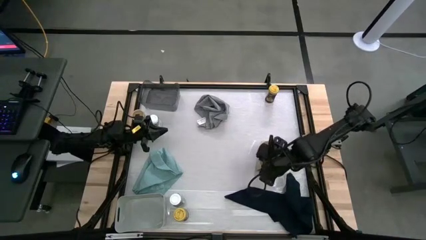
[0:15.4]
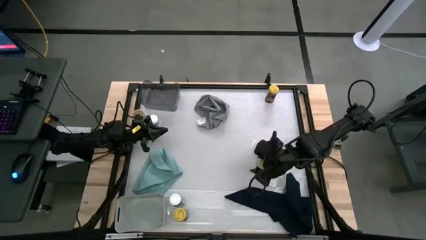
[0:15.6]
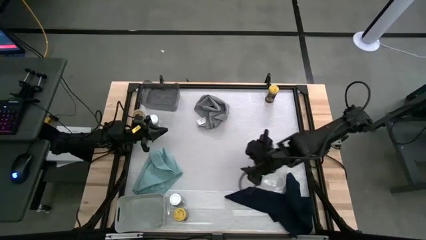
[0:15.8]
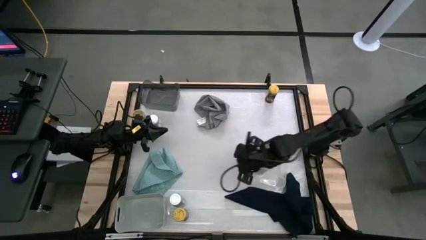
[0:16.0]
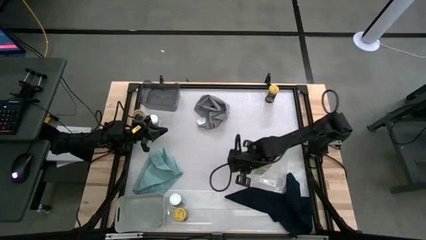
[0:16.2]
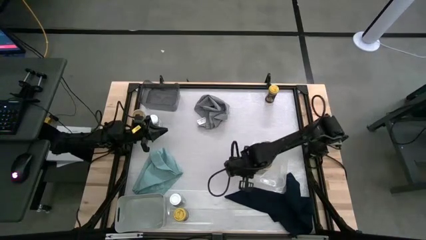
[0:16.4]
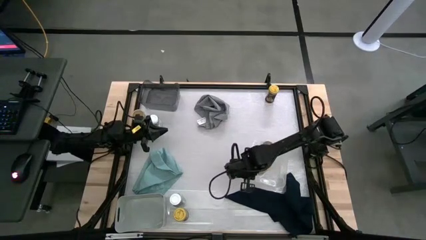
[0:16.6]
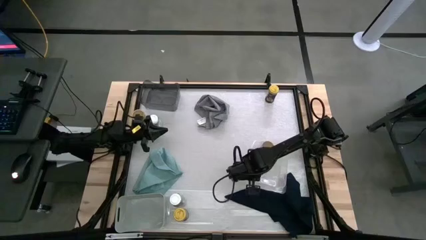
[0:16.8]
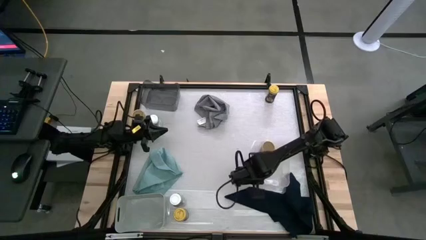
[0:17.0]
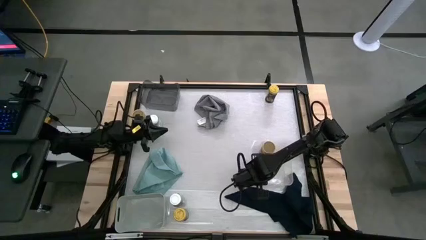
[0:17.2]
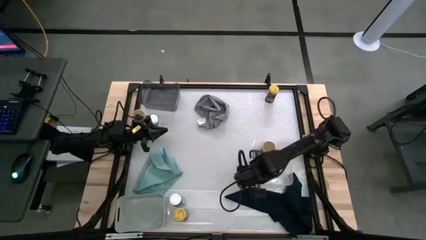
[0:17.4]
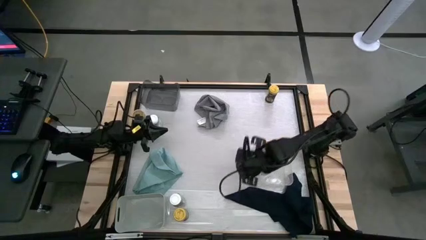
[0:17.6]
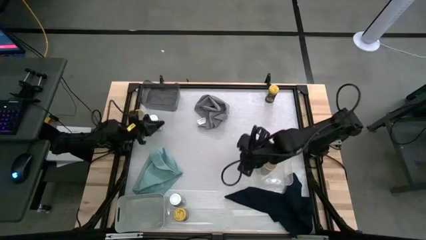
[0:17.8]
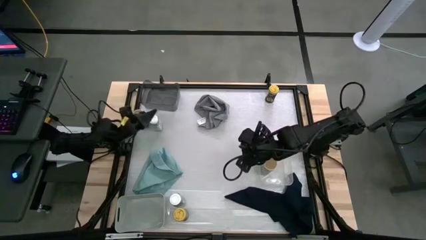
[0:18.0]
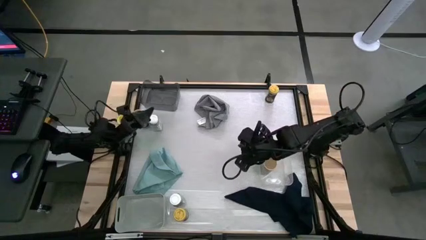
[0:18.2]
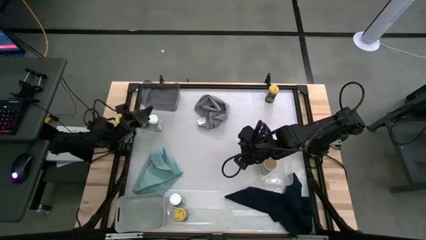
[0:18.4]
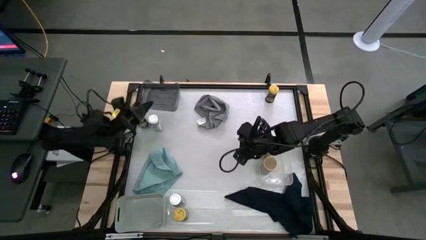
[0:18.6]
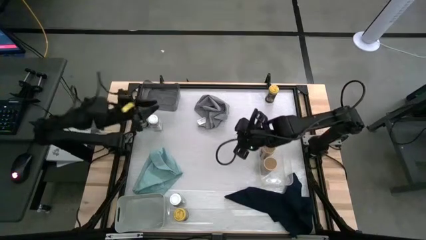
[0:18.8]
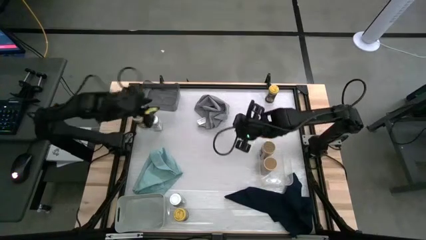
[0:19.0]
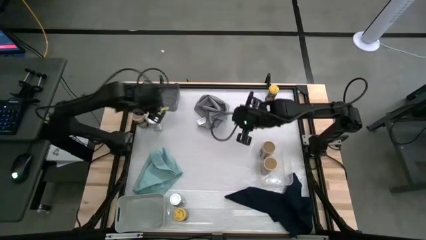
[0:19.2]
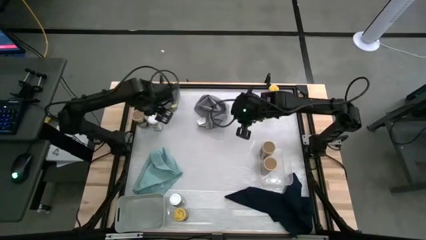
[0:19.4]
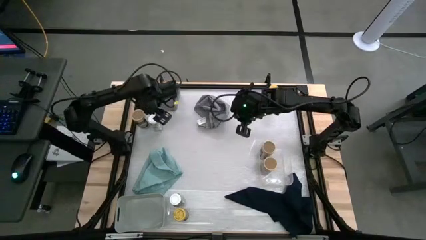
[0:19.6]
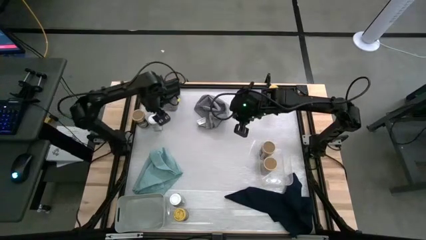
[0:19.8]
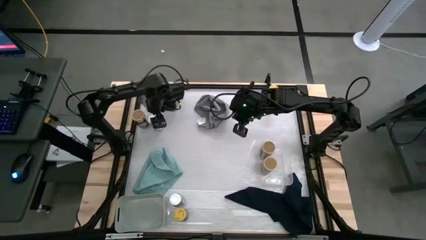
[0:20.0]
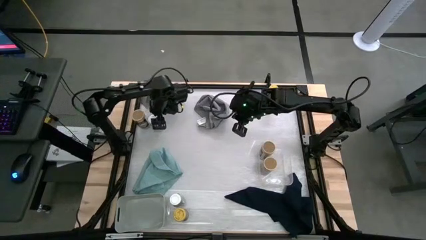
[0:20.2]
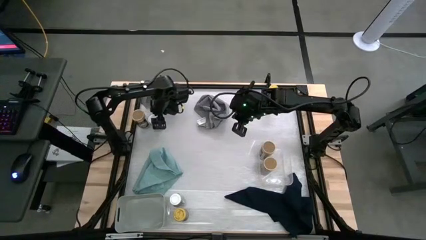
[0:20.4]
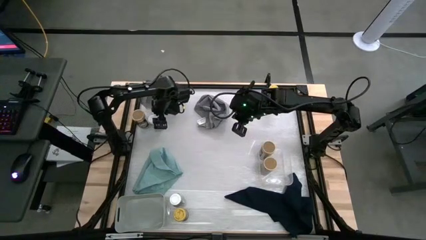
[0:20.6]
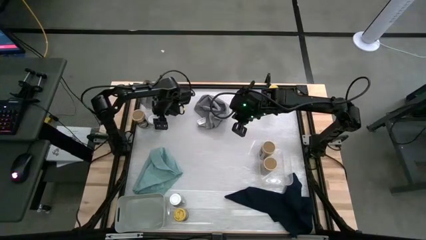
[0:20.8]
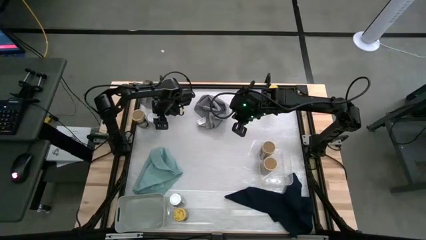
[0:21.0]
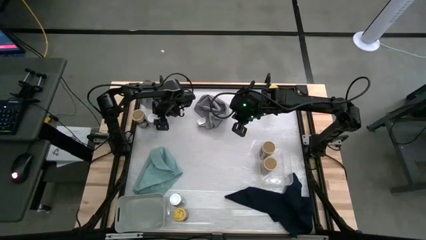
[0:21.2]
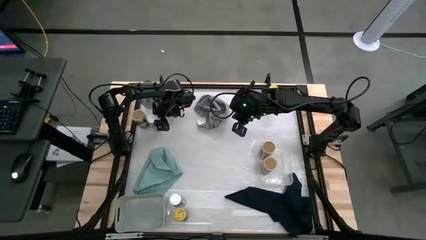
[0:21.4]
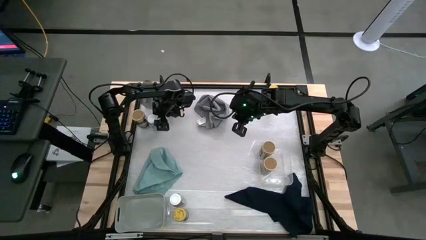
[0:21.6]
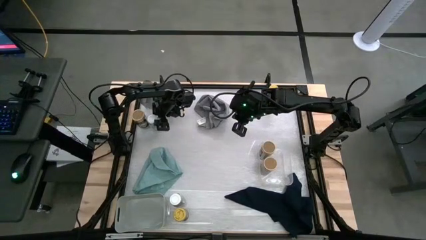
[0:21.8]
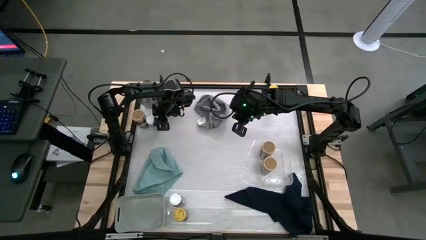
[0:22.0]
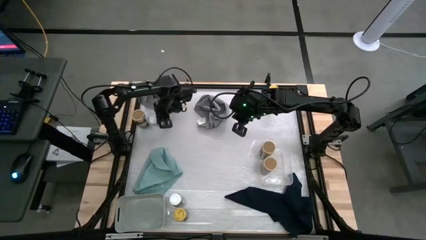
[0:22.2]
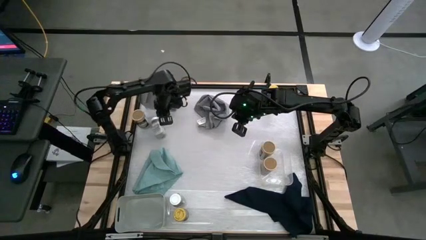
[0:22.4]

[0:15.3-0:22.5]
Task: Sort spices by type
Put the top white seasoning bottle into the black bin

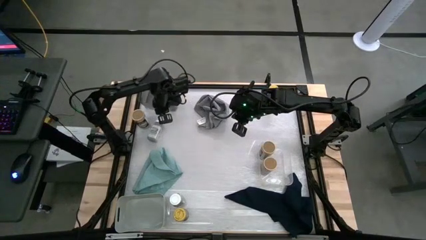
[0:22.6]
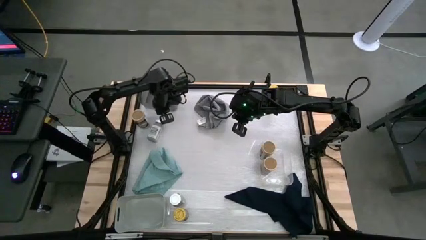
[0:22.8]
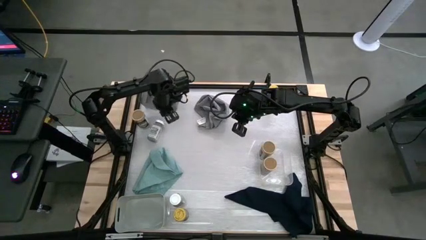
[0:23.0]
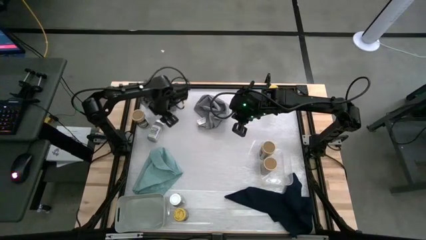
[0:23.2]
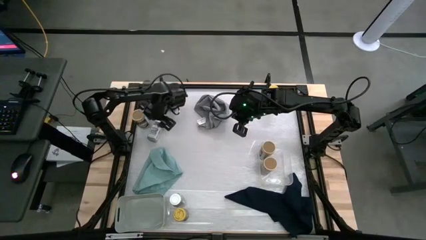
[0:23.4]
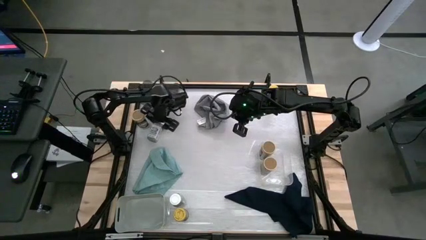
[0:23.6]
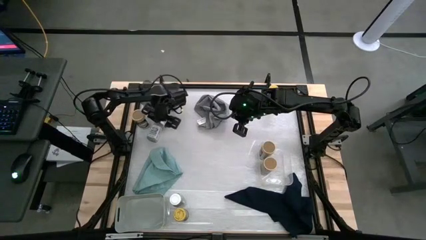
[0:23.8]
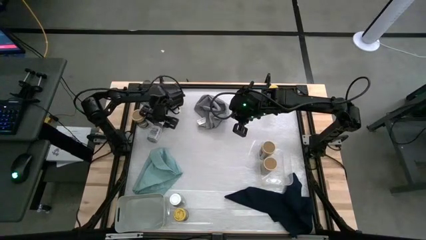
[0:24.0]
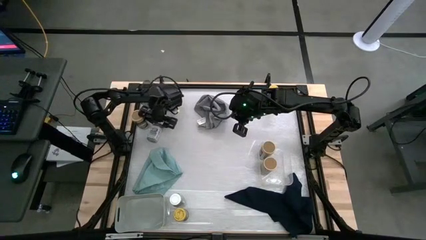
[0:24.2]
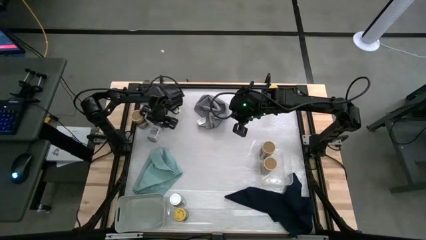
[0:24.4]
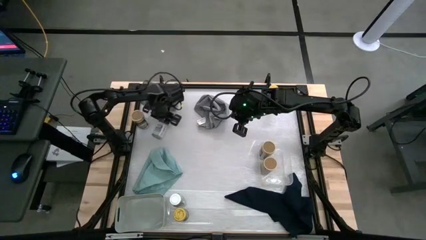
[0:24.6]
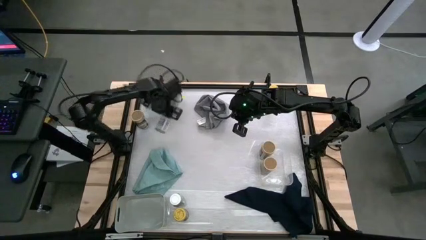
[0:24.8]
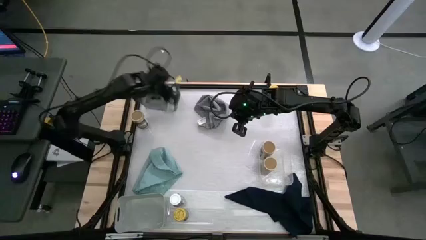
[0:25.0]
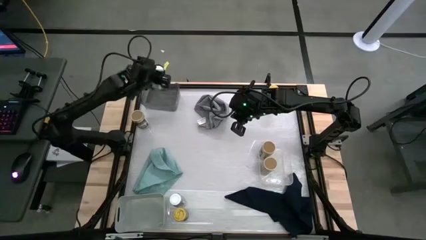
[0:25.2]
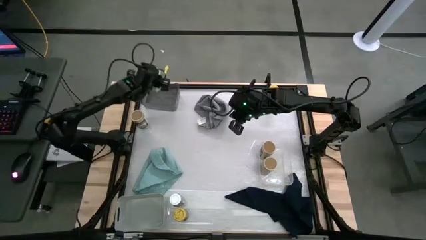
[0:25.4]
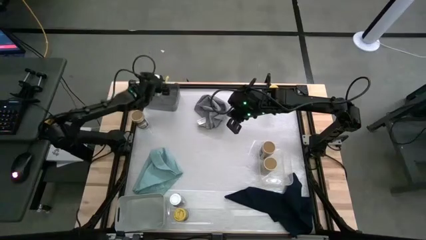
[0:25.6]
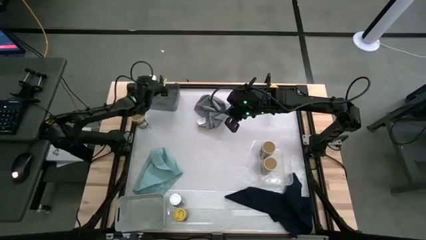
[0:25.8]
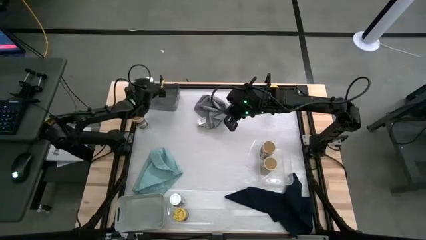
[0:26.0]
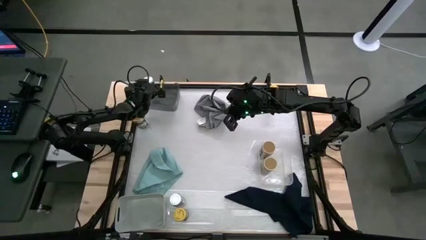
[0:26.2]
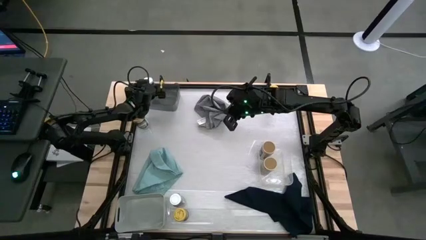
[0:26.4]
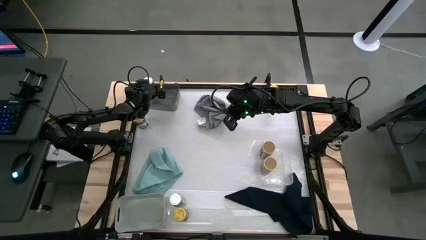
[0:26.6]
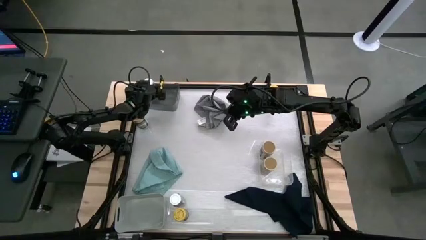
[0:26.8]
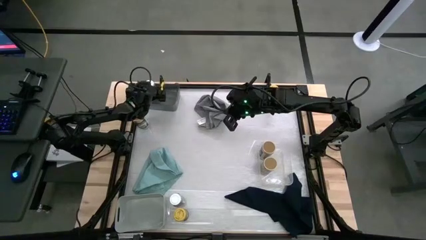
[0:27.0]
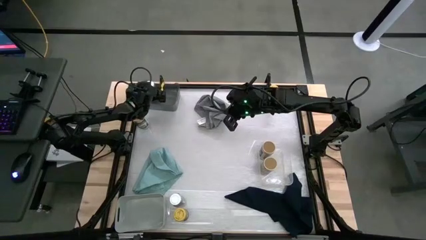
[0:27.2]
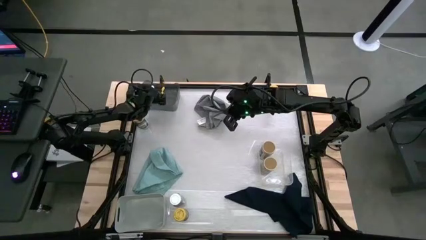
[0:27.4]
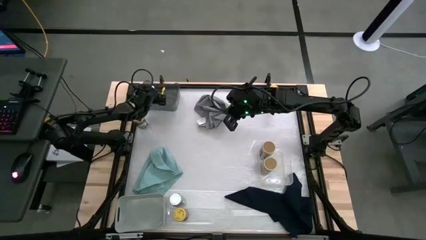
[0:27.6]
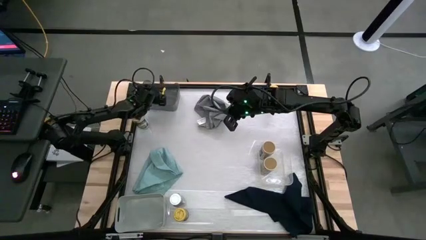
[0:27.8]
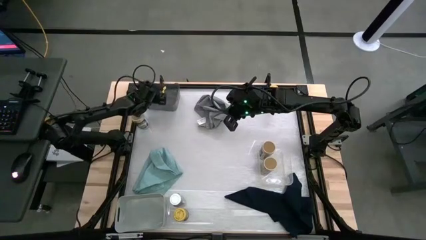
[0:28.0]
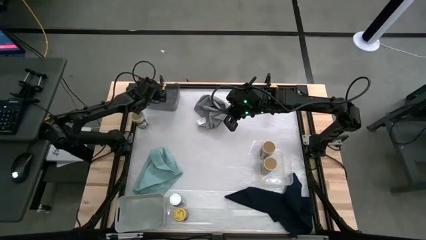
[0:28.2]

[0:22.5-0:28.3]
Put the top white seasoning bottle into the black bin

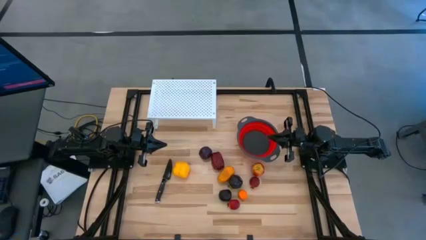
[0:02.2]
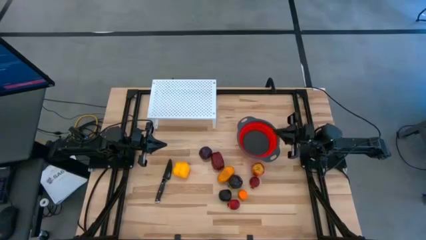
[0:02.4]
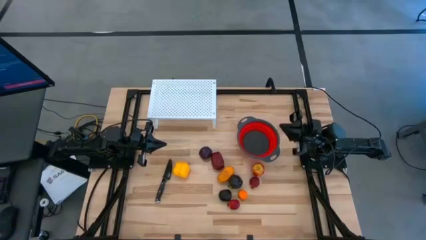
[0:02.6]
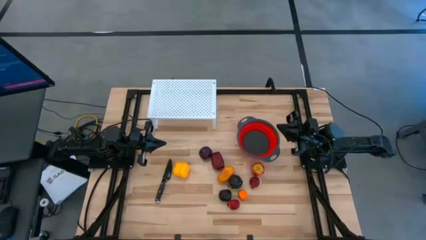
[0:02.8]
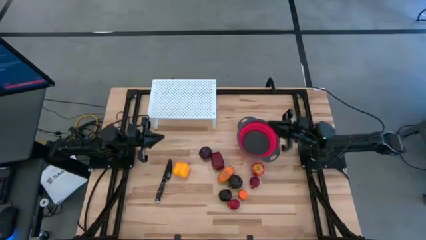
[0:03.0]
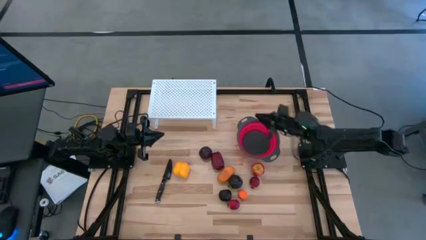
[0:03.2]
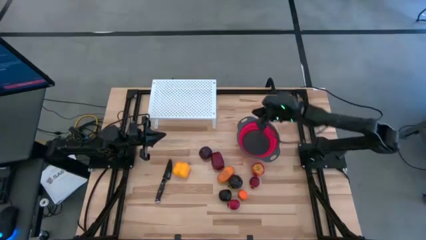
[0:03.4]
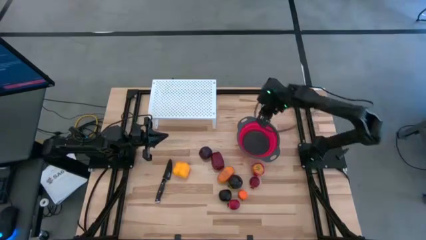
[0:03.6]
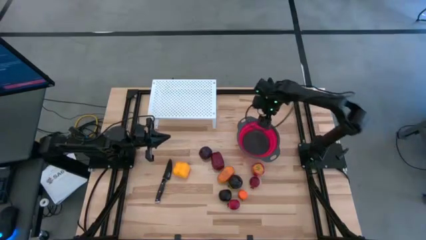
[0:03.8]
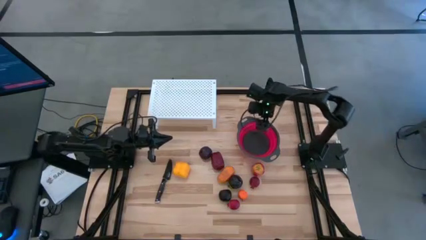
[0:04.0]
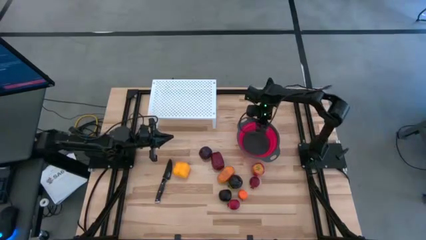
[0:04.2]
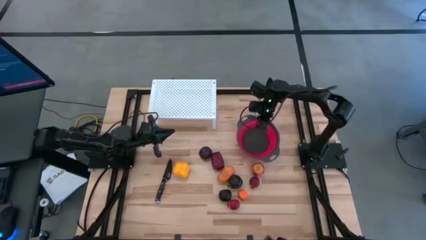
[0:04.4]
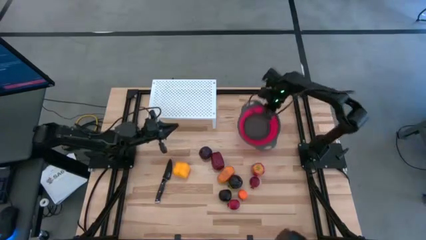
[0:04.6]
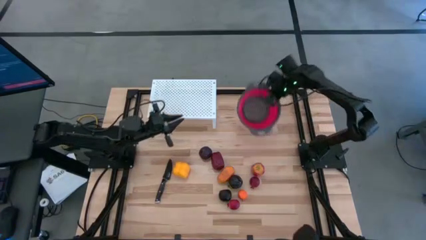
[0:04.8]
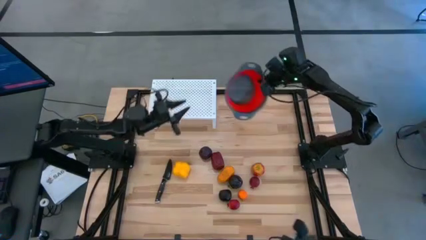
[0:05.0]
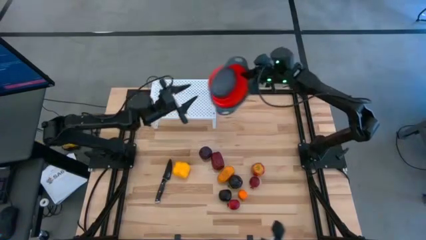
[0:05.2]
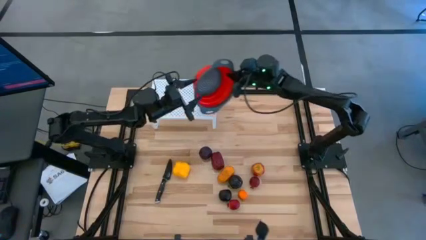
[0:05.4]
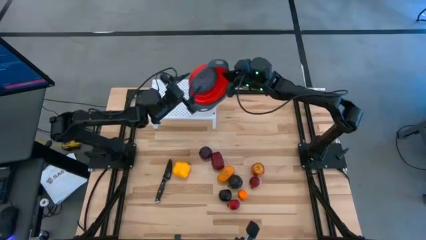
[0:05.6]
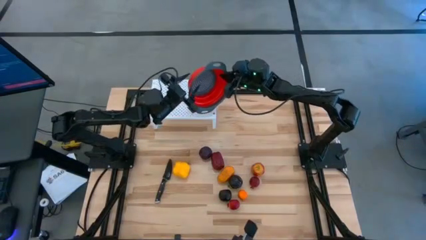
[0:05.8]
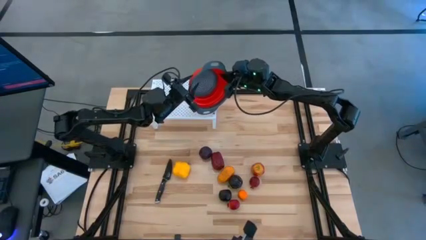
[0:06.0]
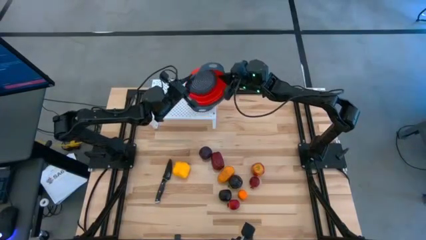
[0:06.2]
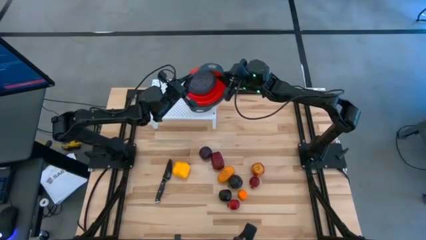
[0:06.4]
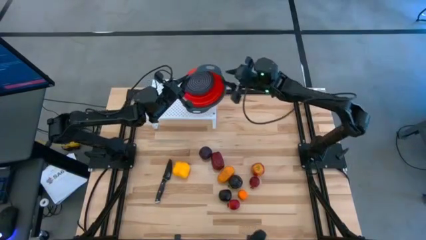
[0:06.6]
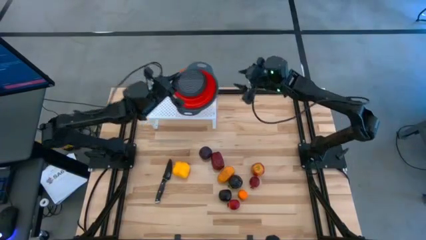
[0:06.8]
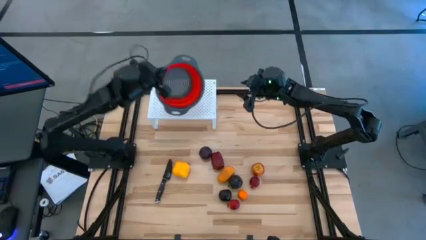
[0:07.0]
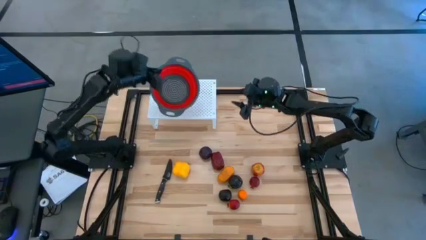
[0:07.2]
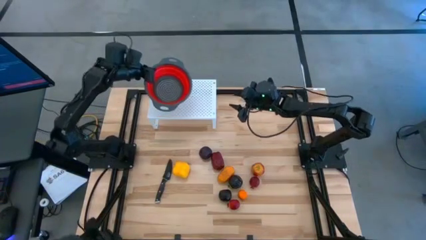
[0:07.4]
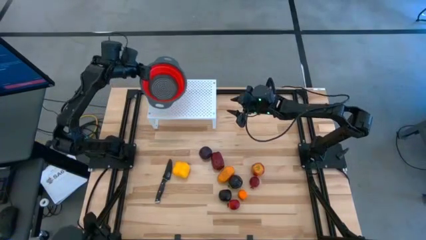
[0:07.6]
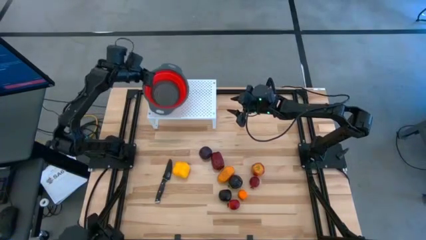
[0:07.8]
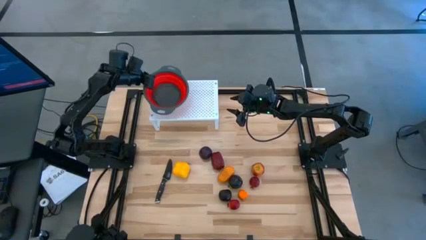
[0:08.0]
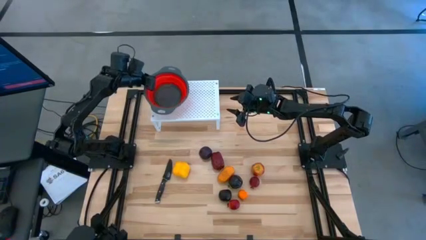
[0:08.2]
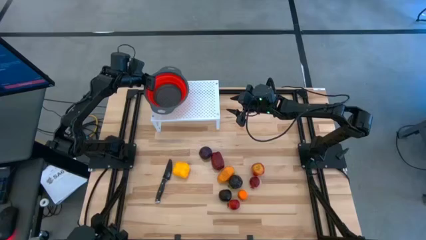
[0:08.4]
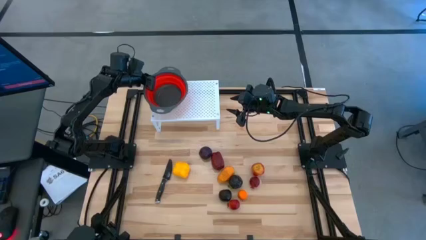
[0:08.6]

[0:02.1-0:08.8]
Task: Pick & Place Fruit
Put the red strainer bowl on the shelf
